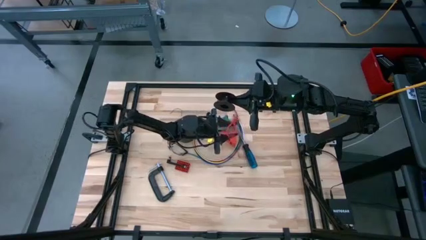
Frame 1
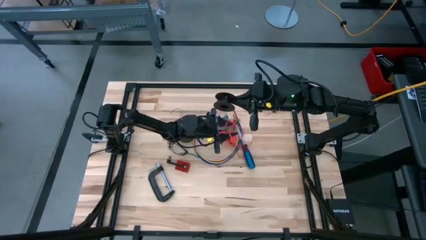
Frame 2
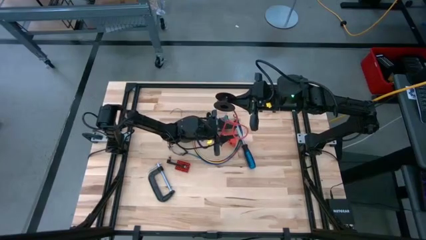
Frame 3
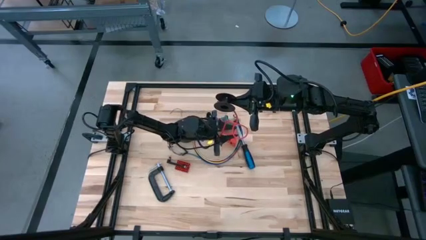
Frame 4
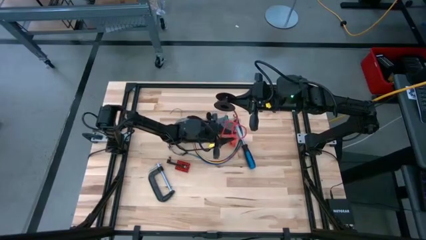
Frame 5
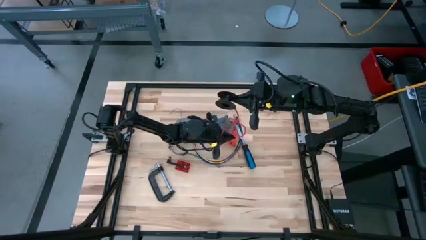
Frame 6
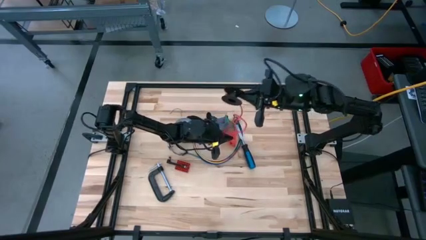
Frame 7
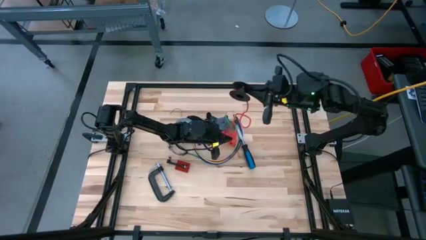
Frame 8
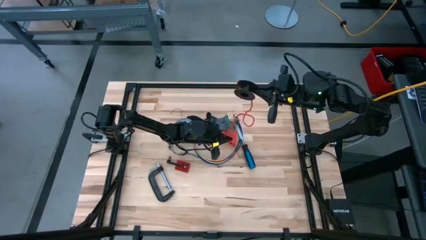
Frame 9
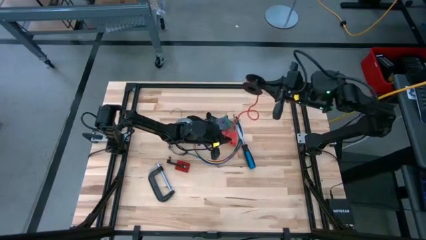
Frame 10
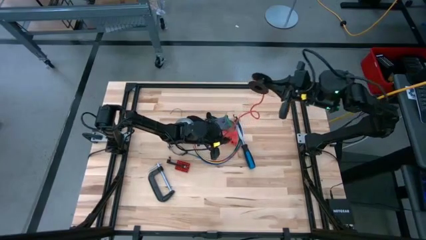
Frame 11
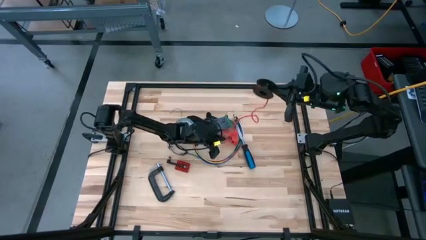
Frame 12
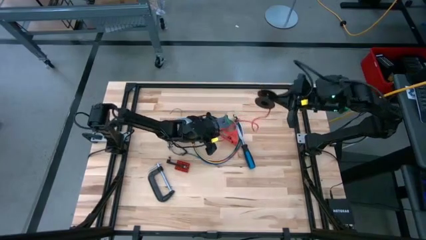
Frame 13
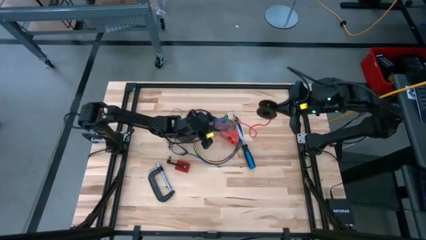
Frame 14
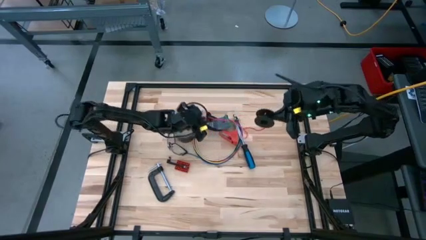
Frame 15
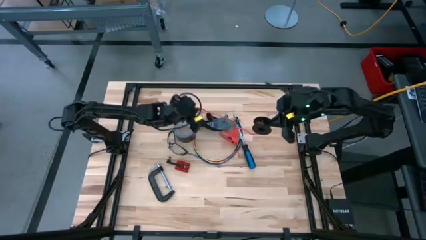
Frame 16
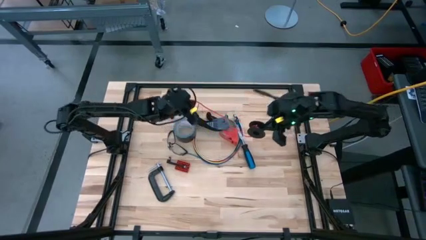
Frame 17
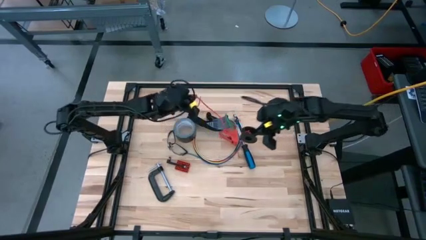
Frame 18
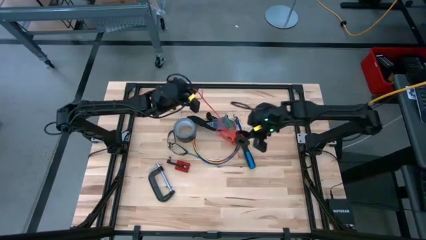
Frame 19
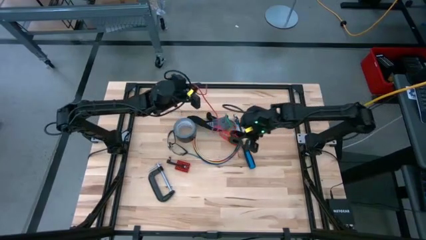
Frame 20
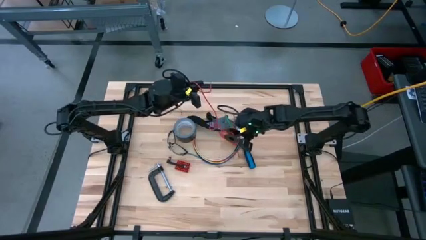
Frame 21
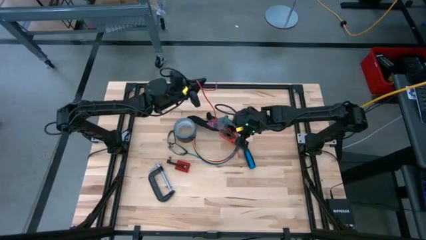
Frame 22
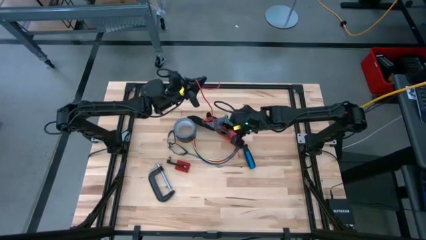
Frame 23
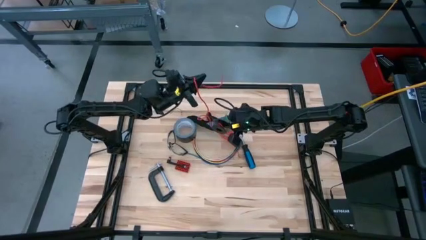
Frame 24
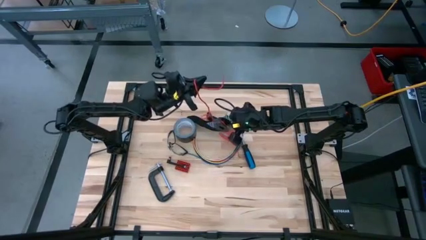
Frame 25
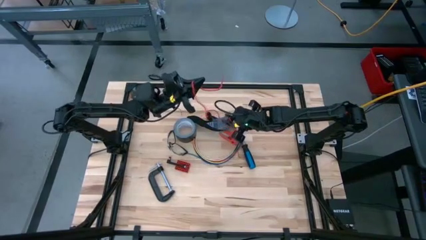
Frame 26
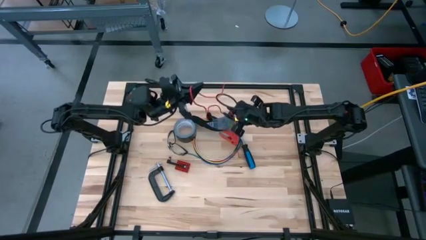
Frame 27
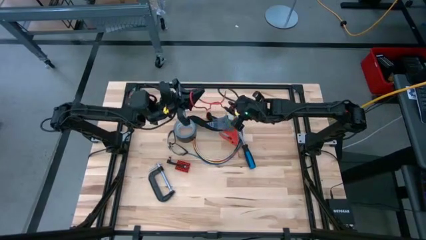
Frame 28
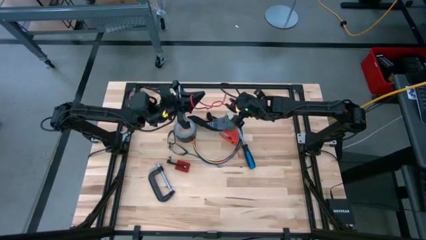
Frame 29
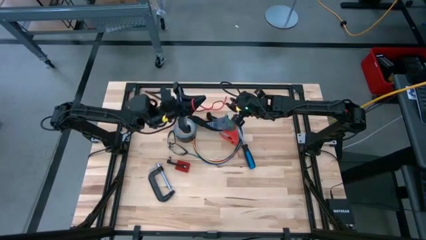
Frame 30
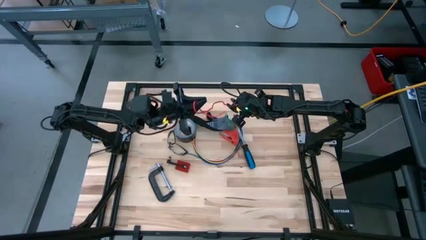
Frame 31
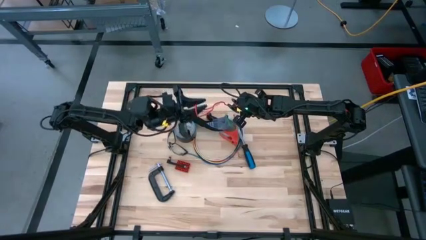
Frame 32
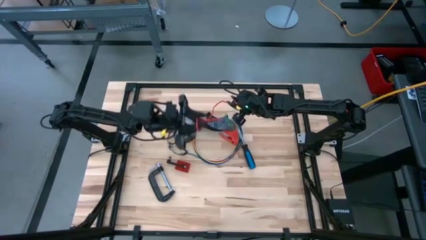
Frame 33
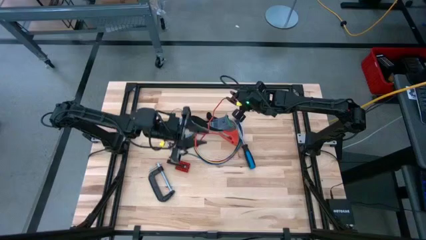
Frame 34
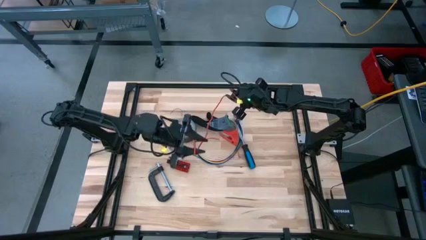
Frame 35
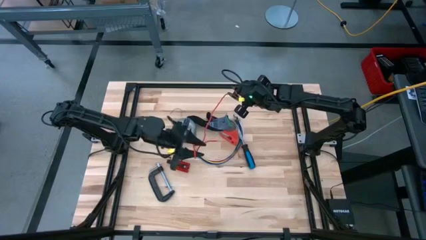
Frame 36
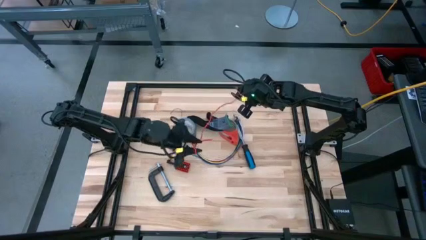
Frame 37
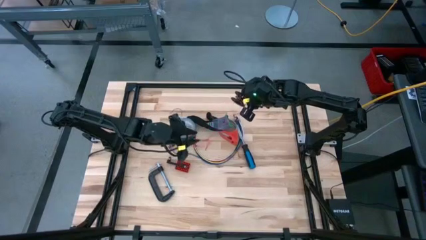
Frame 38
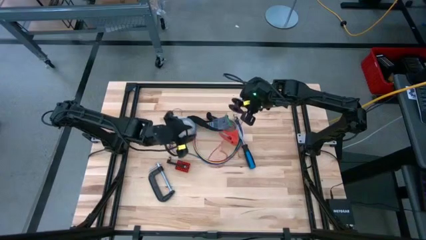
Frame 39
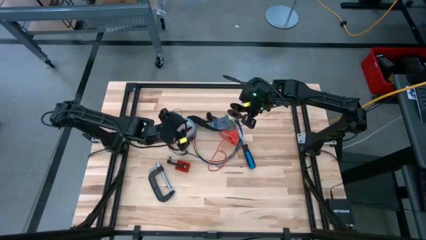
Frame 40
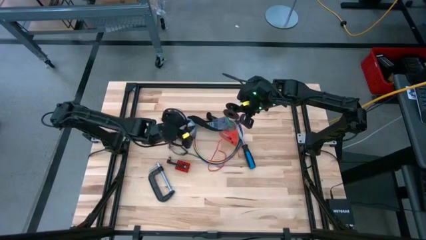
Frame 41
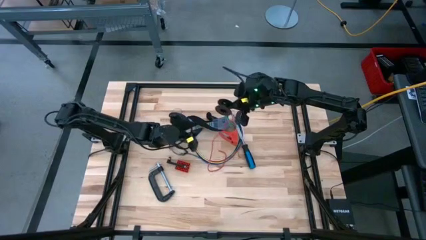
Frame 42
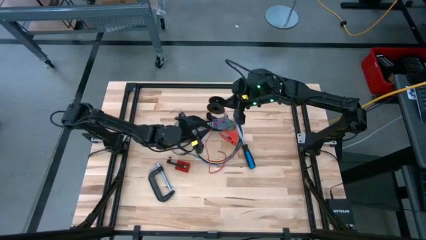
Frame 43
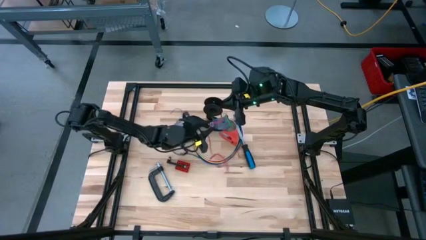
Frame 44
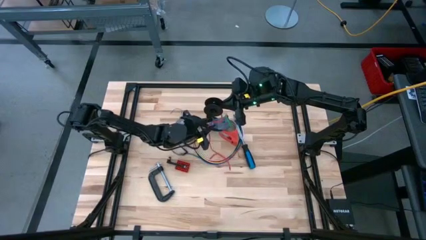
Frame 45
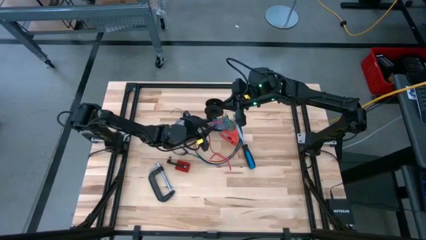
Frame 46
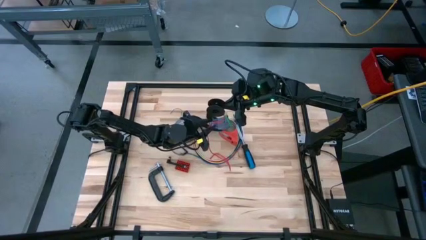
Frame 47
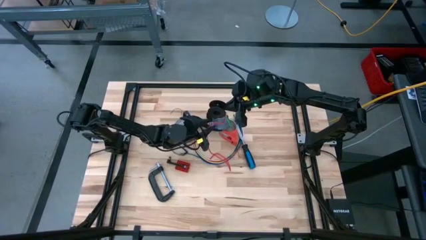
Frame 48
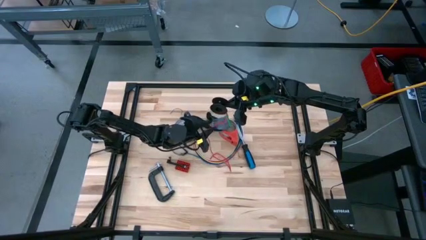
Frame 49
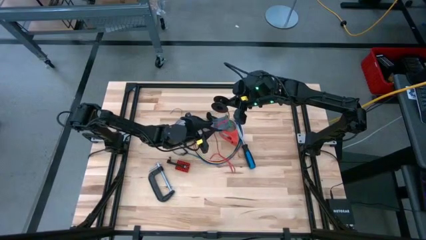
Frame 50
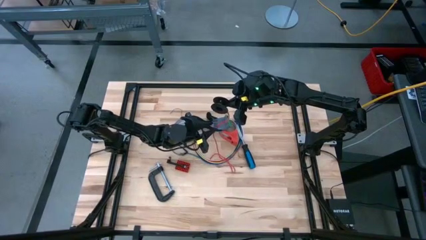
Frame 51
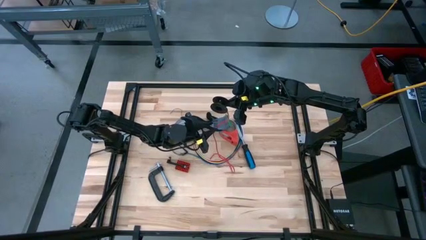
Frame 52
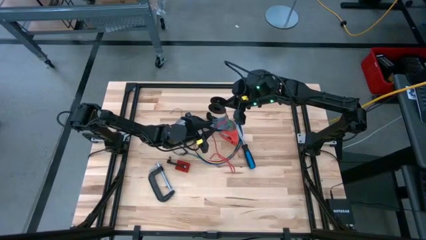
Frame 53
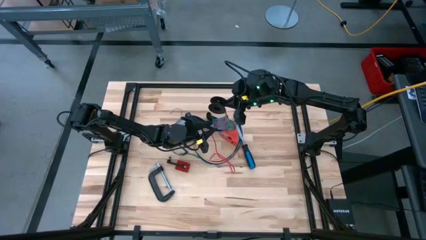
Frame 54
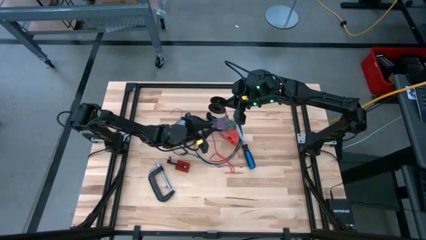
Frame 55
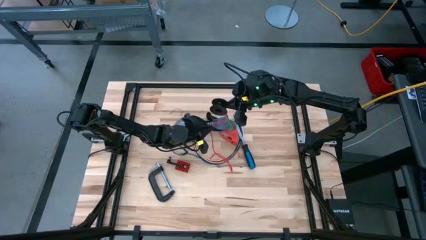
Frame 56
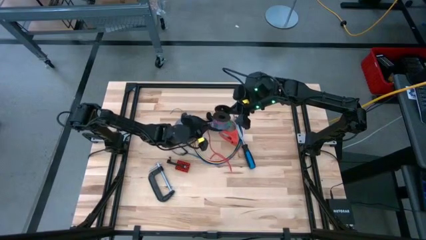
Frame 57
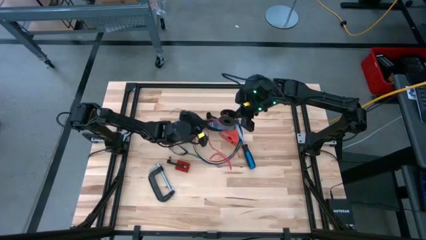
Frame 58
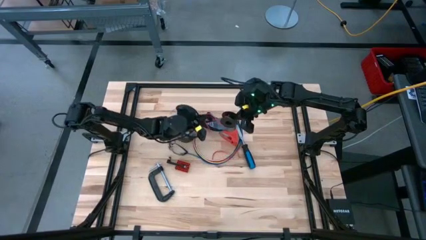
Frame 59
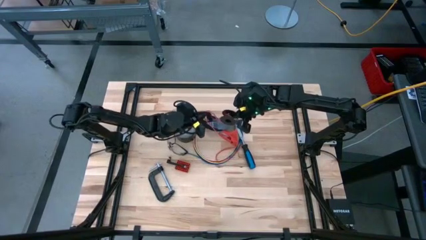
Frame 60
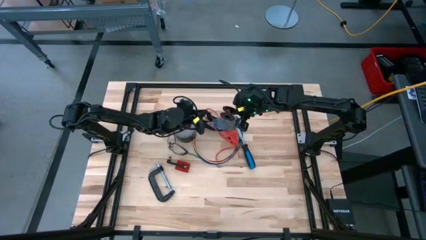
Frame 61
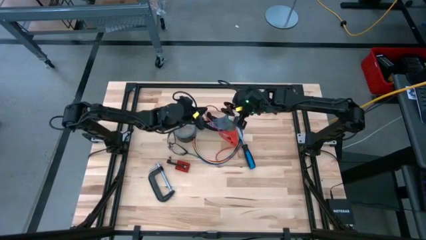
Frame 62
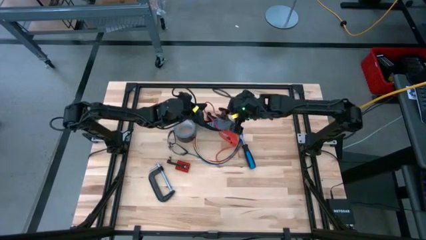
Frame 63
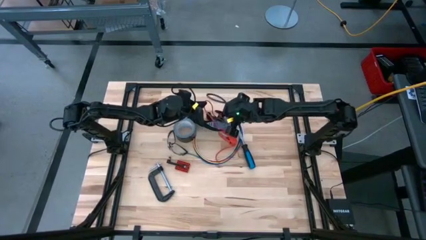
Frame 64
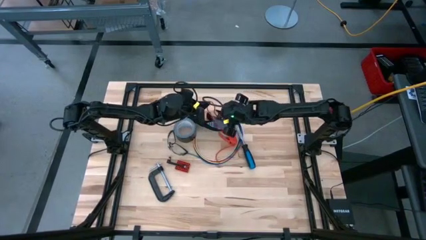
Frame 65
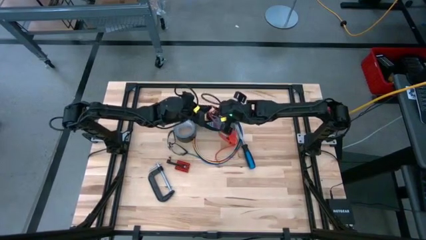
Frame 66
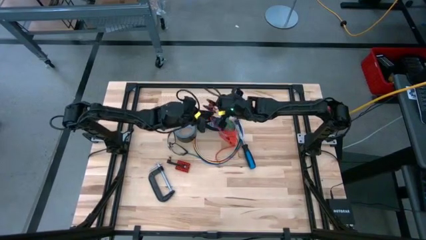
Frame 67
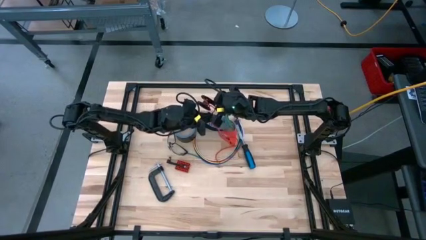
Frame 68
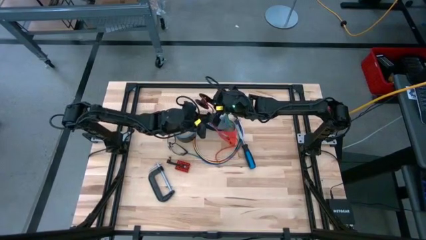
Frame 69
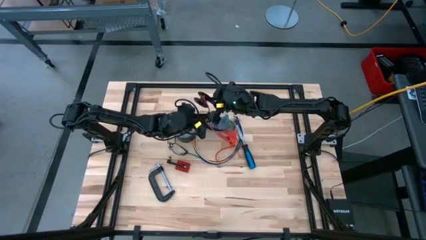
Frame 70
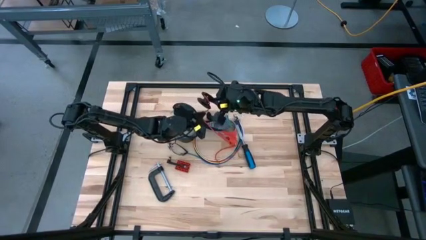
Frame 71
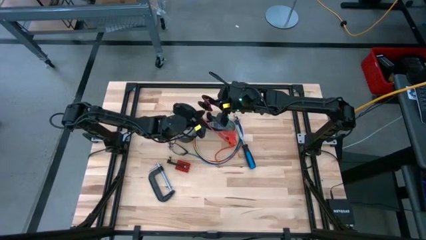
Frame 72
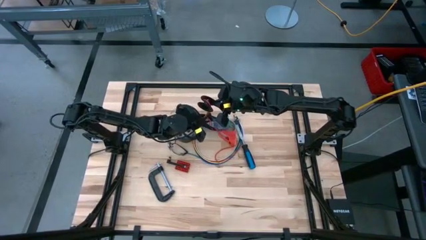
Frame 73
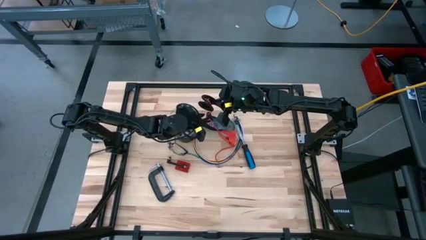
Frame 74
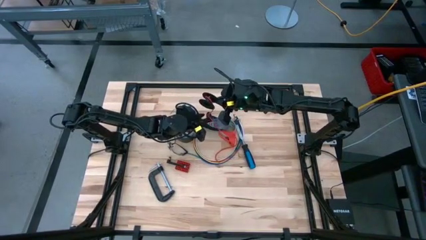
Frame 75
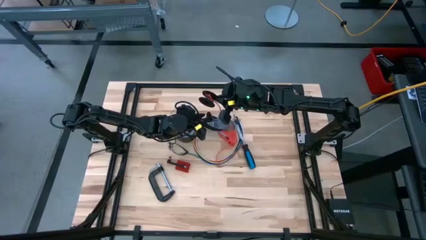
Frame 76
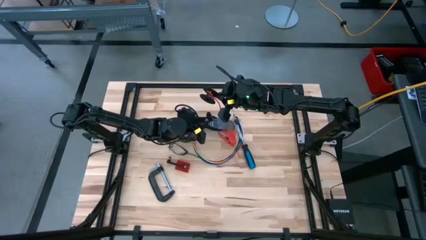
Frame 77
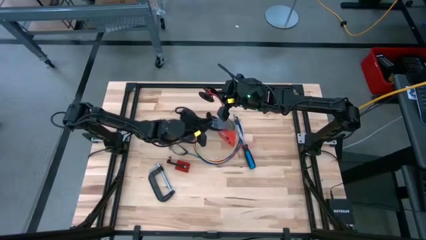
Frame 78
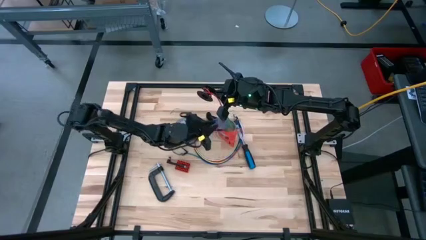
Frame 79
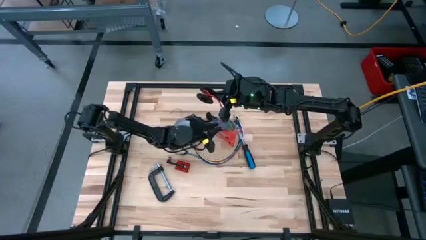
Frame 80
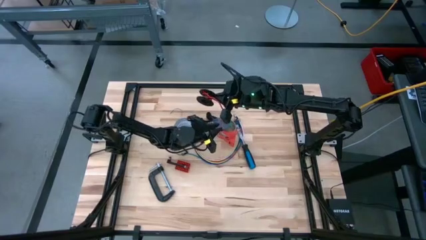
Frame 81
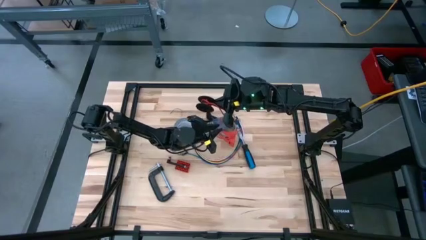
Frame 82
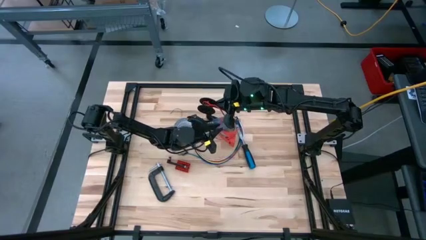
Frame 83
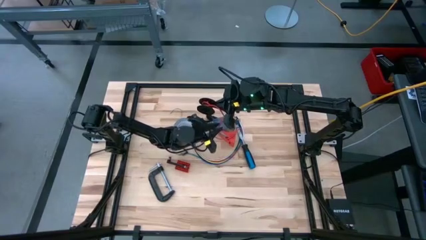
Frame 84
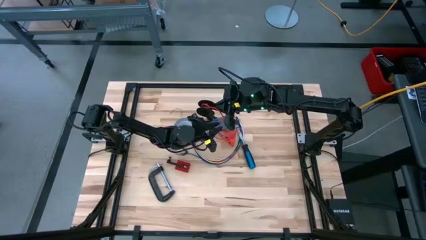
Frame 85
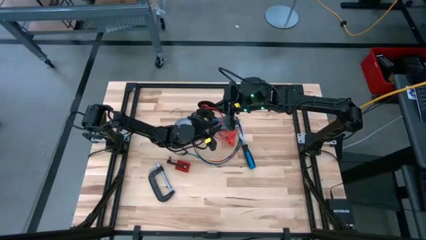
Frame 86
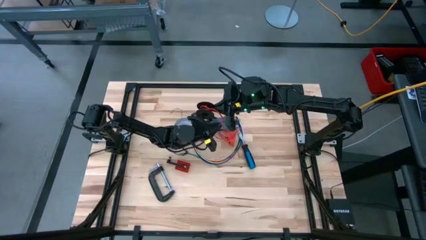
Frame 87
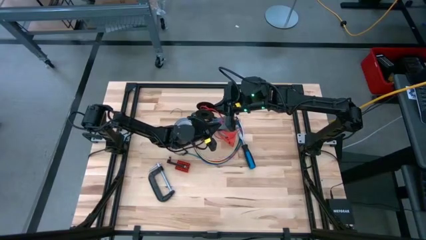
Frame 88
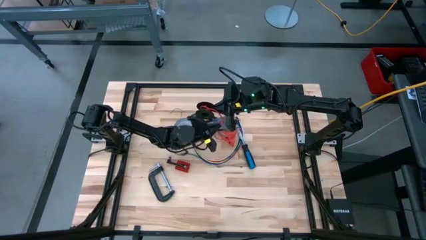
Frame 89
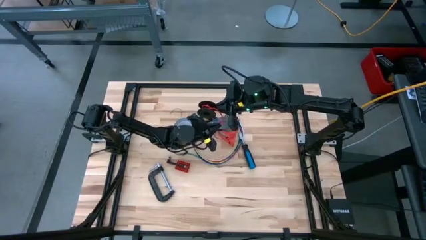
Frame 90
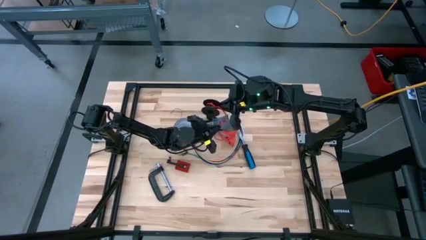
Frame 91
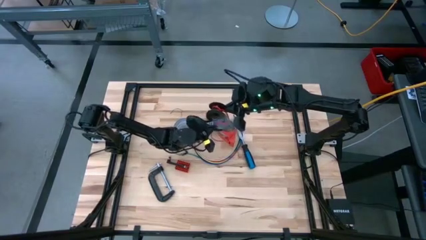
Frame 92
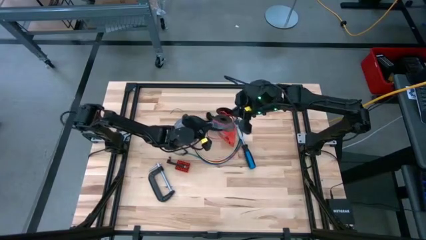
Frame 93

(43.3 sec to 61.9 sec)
Task: Coil cords
Coil the red wire cable onto the black spool
